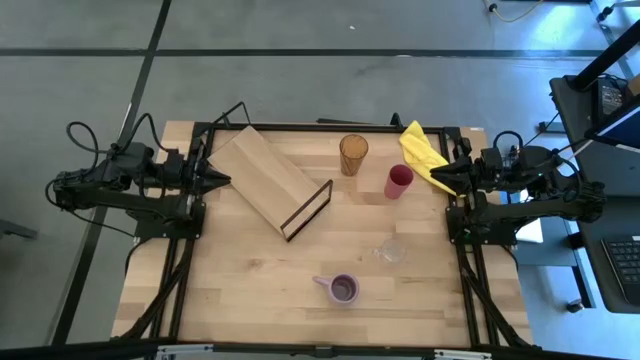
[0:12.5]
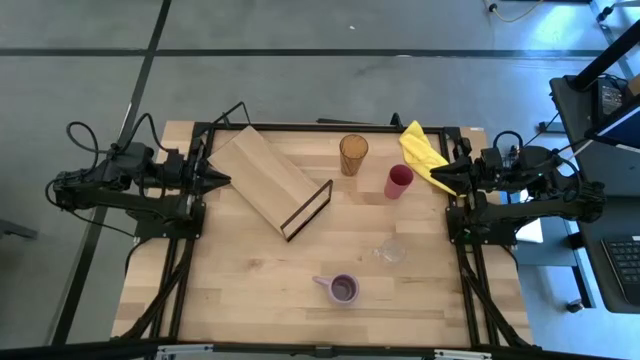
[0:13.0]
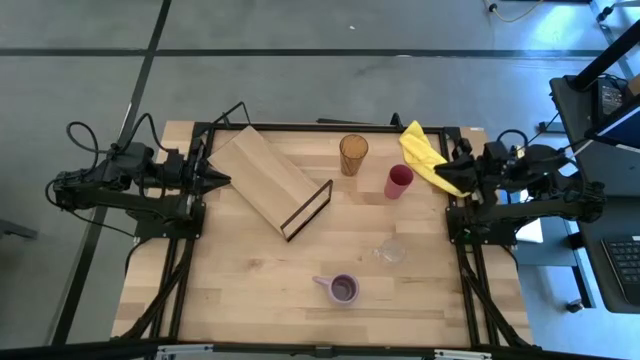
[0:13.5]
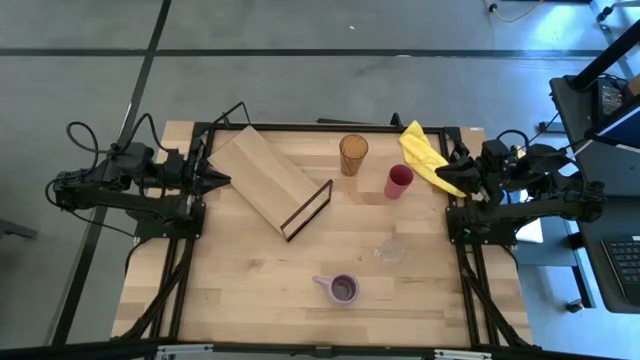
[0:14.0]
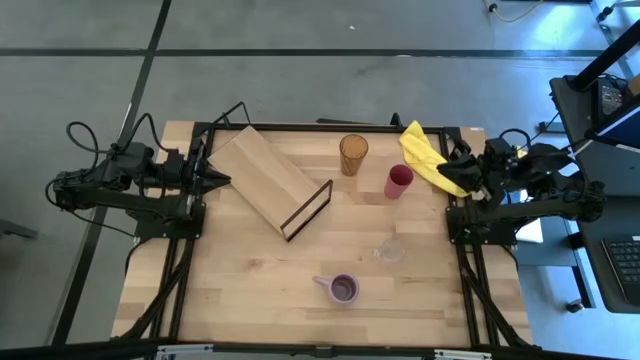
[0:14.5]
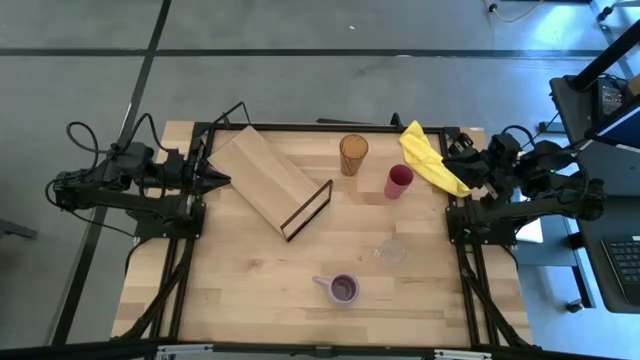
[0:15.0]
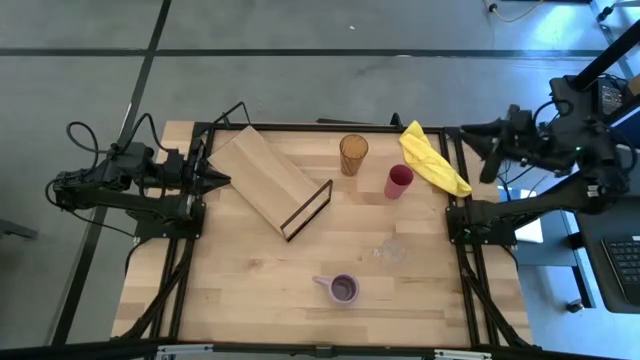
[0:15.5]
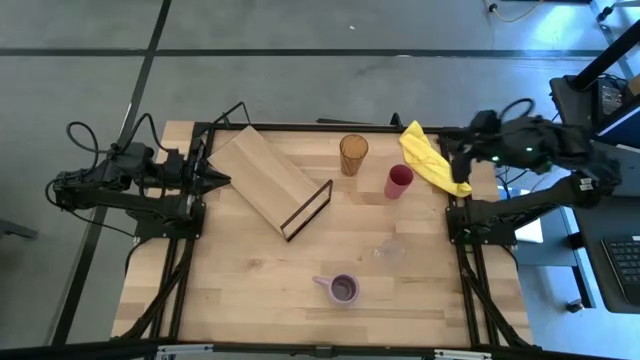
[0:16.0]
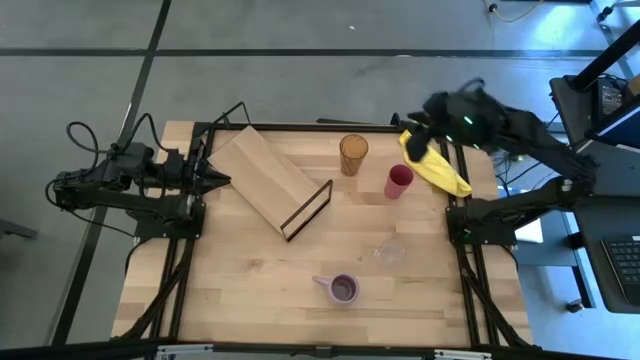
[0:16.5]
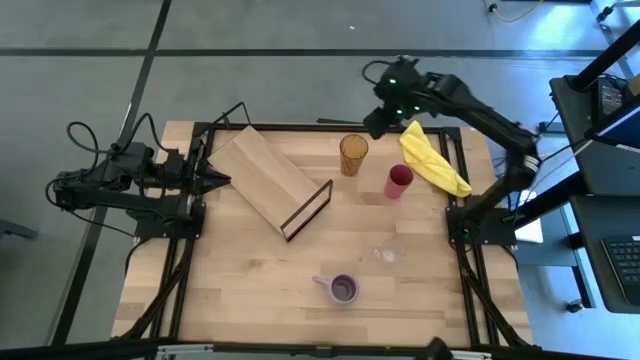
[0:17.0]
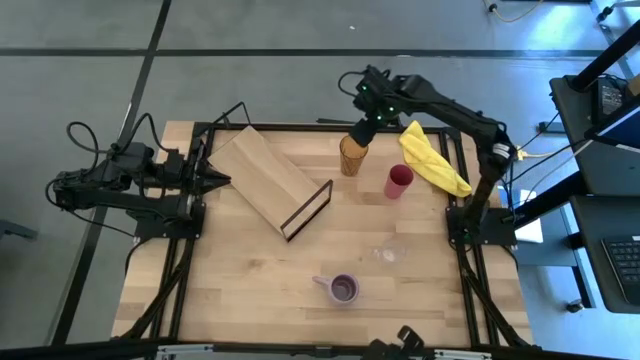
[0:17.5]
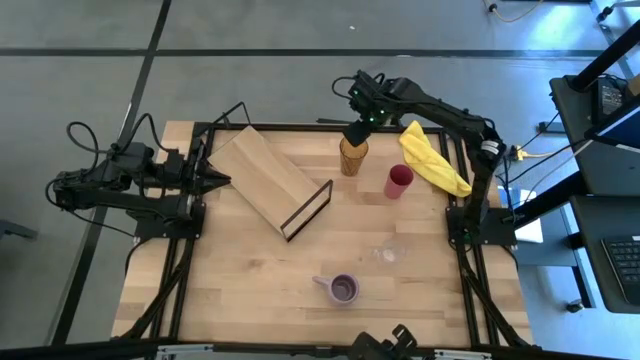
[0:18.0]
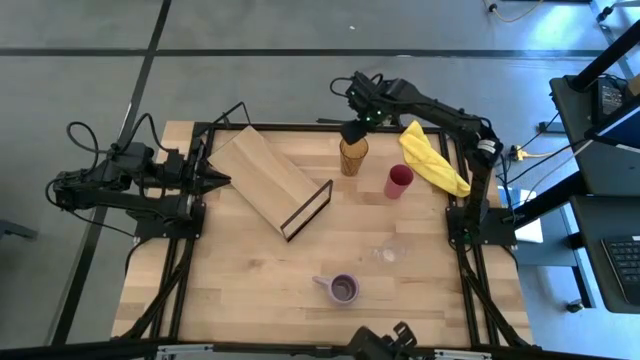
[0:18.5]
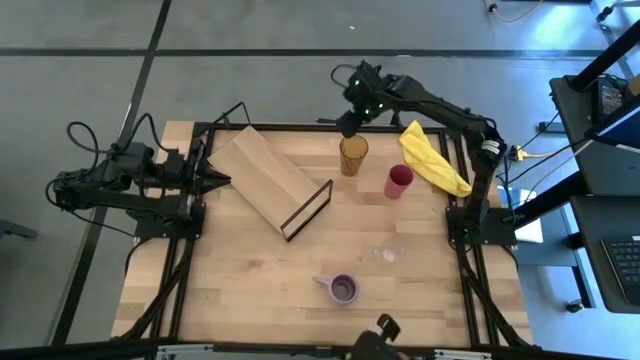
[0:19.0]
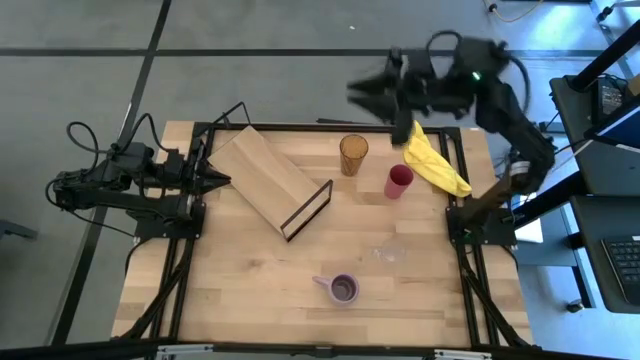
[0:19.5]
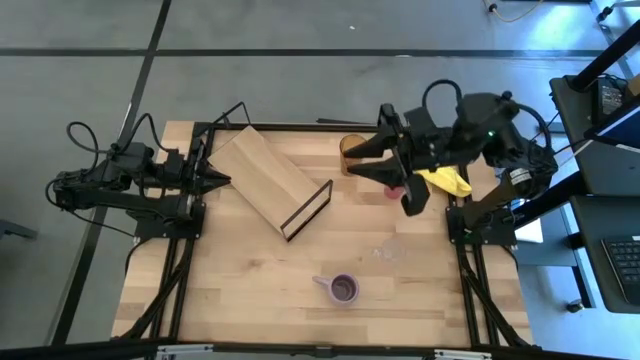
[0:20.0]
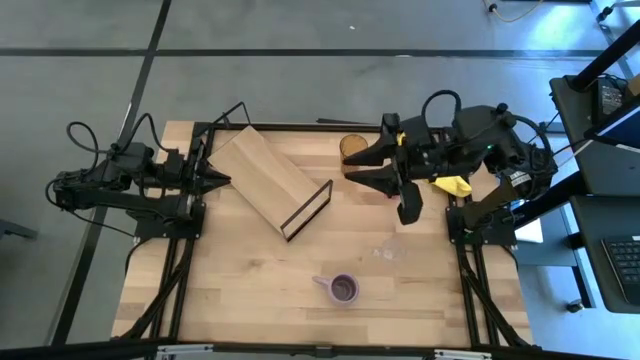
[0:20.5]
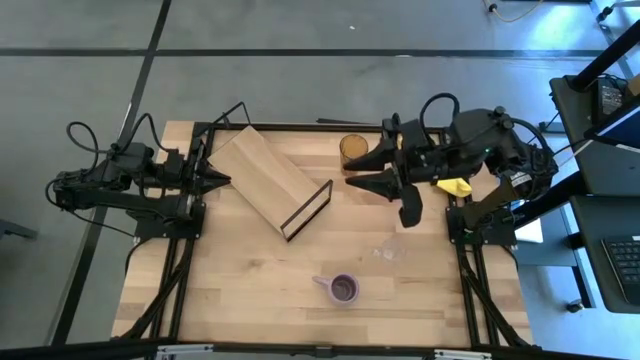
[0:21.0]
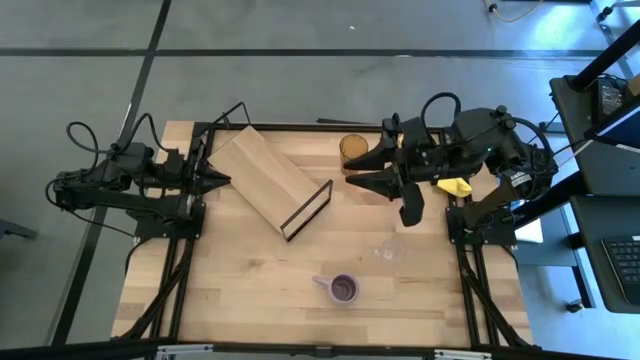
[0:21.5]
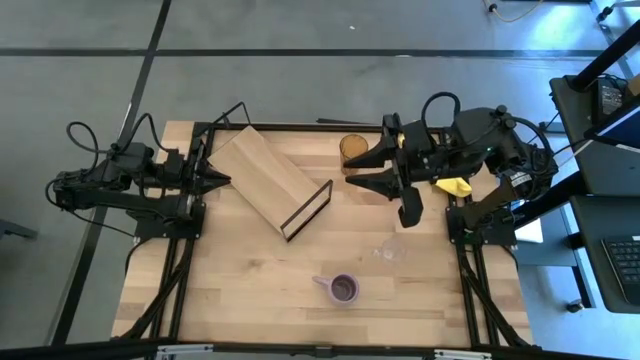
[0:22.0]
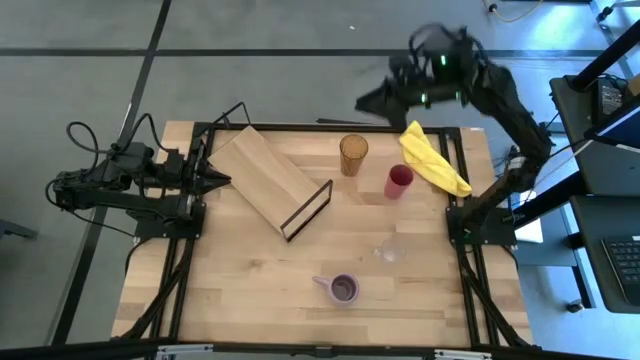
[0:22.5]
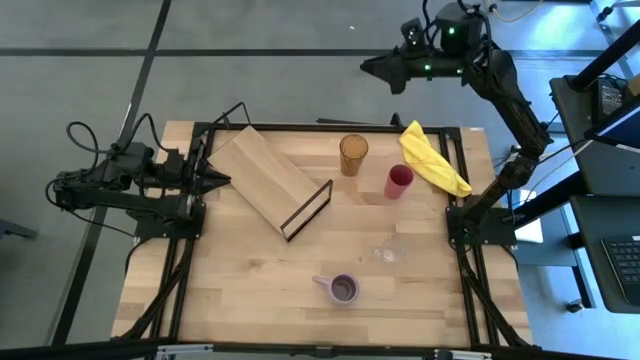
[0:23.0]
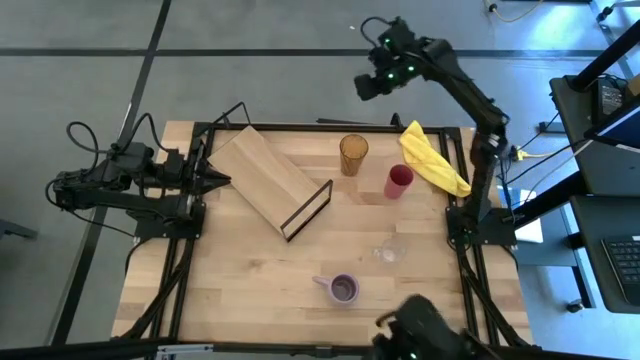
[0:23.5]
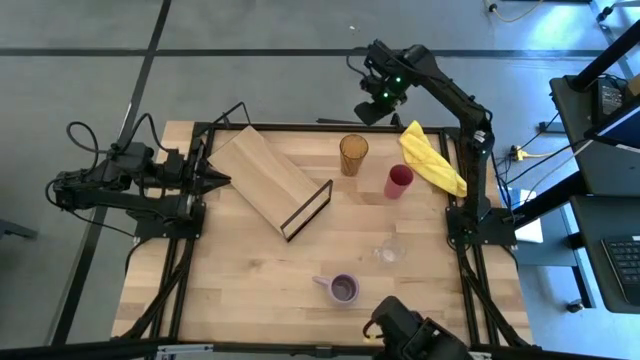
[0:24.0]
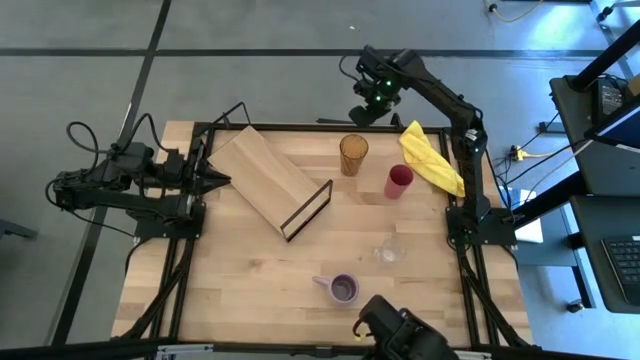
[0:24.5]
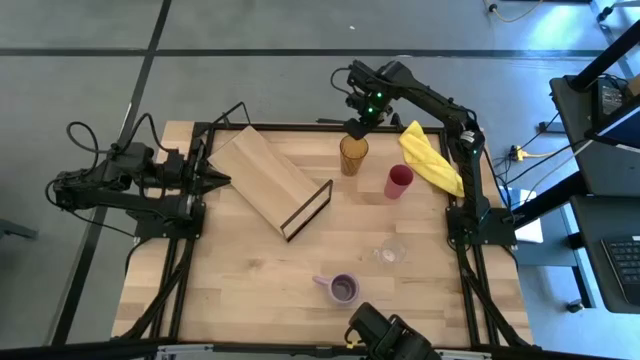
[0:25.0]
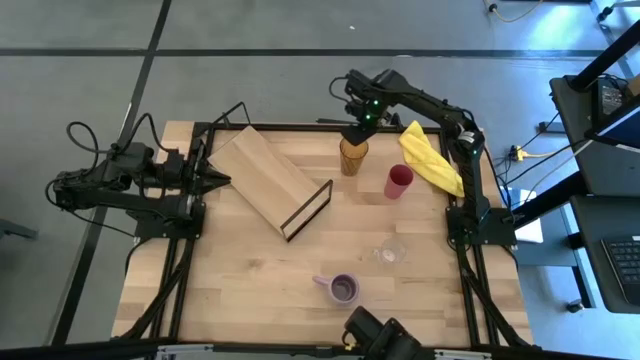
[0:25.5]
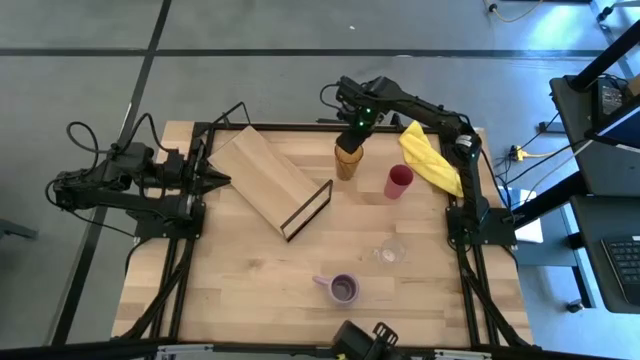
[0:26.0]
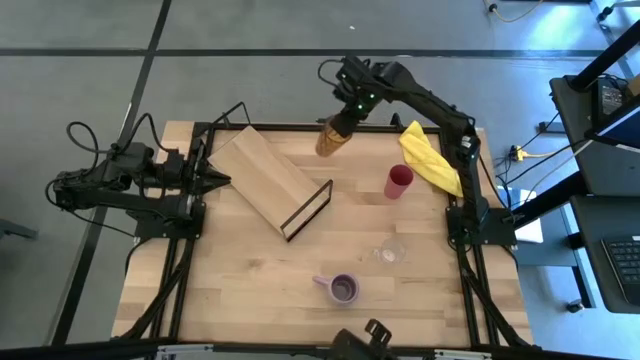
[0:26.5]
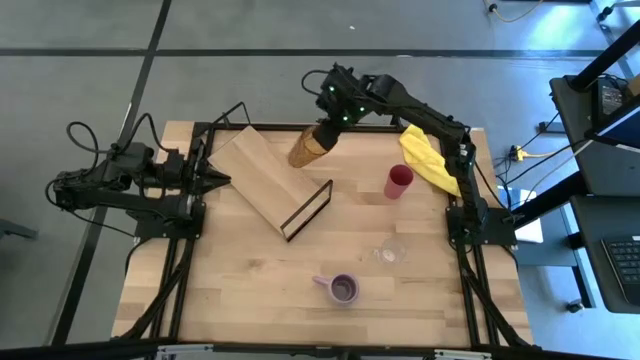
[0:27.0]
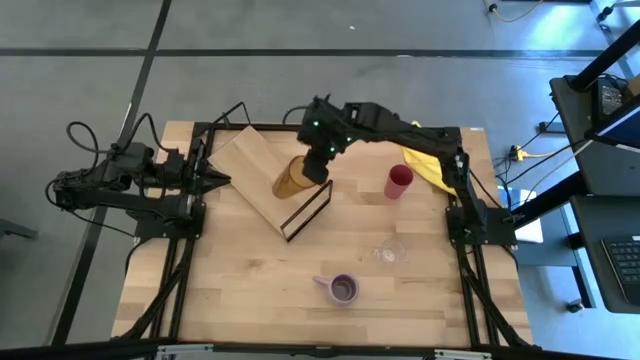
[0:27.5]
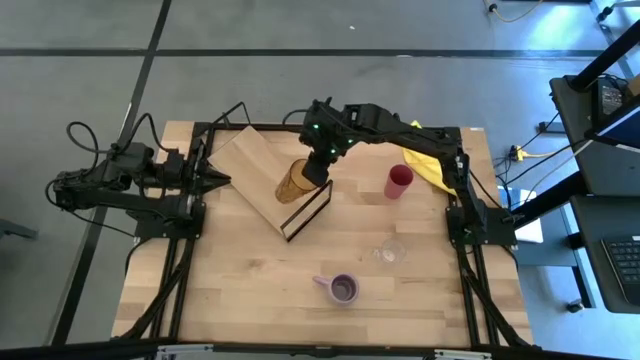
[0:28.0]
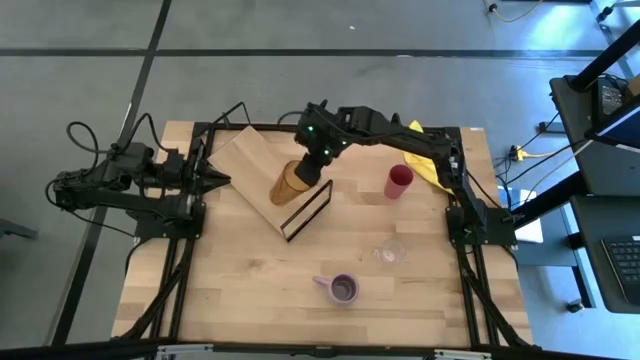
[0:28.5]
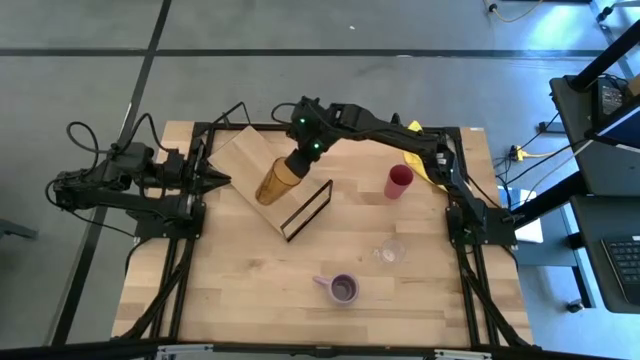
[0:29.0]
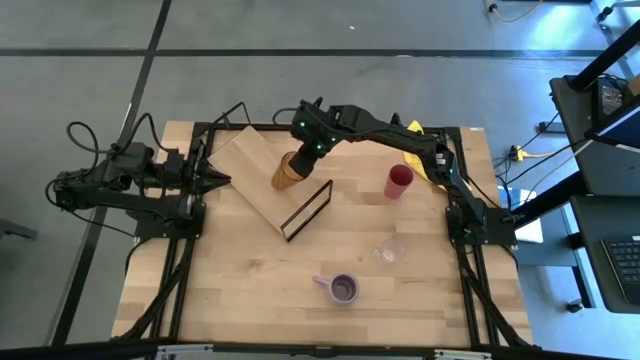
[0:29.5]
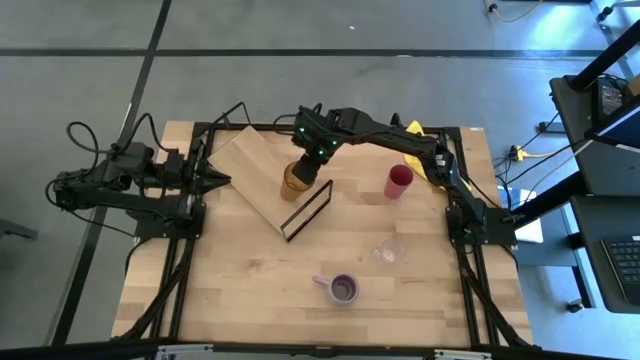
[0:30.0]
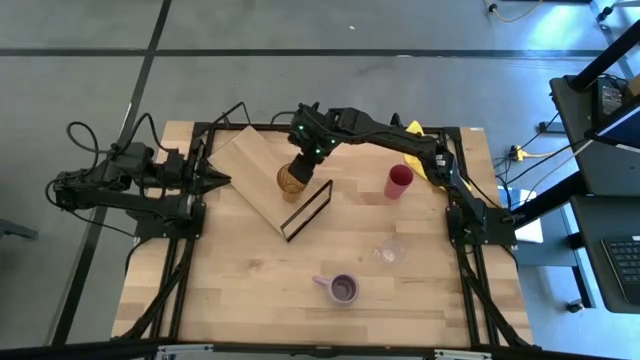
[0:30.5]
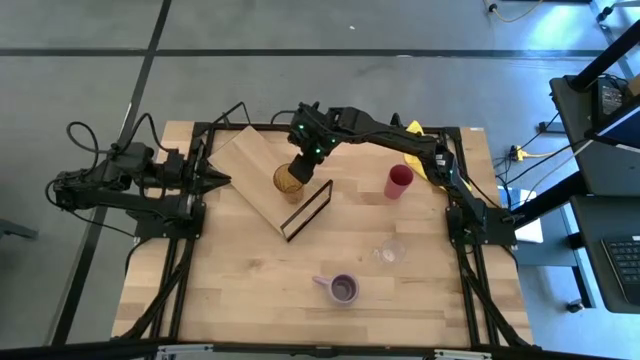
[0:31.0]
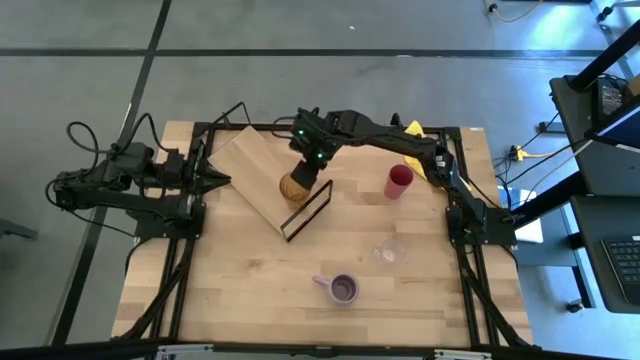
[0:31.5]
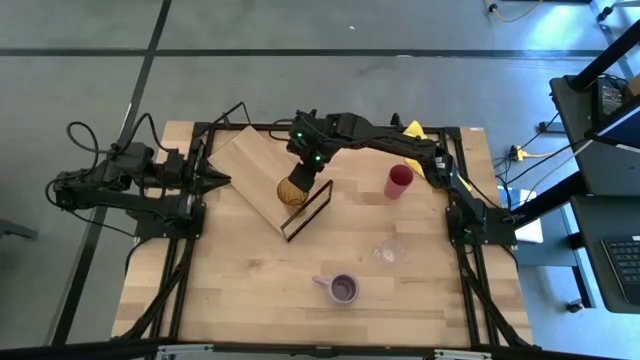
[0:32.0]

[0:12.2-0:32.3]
Task: Stack small to large cups/mugs on shelf
Put the brown transparent cup on the shelf
